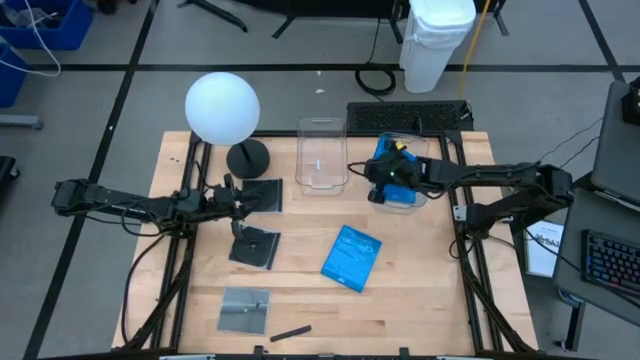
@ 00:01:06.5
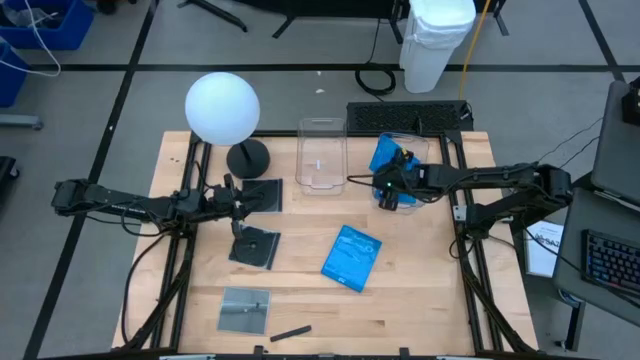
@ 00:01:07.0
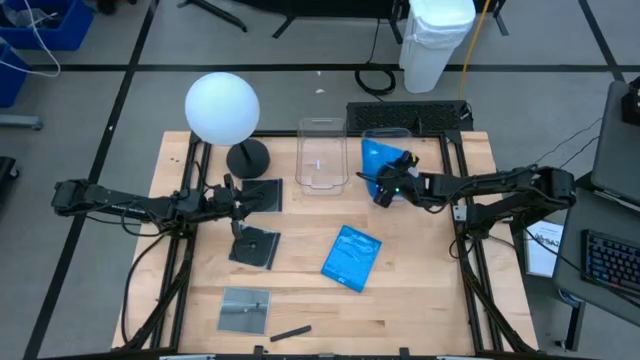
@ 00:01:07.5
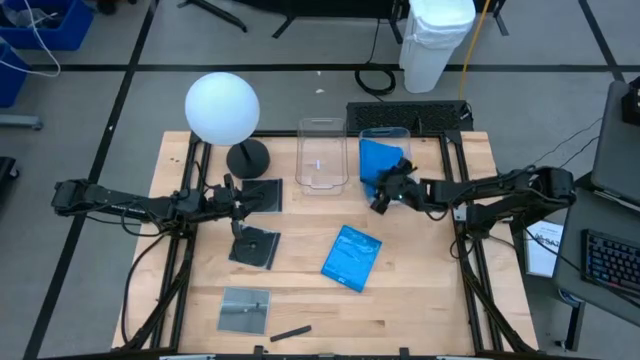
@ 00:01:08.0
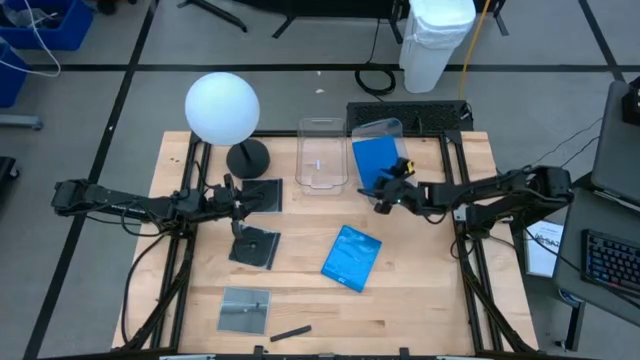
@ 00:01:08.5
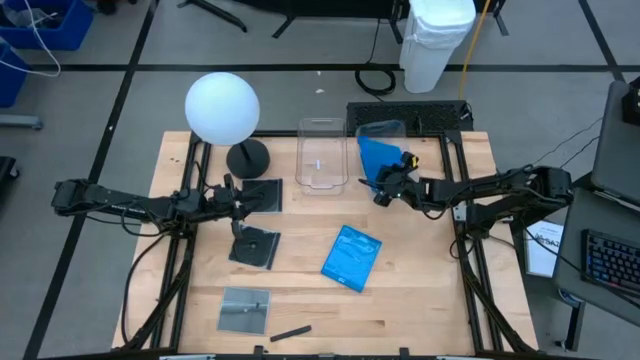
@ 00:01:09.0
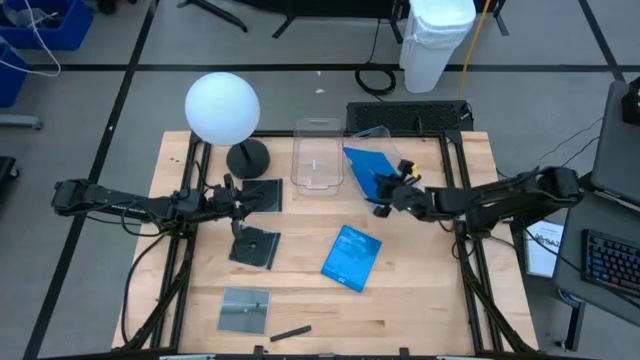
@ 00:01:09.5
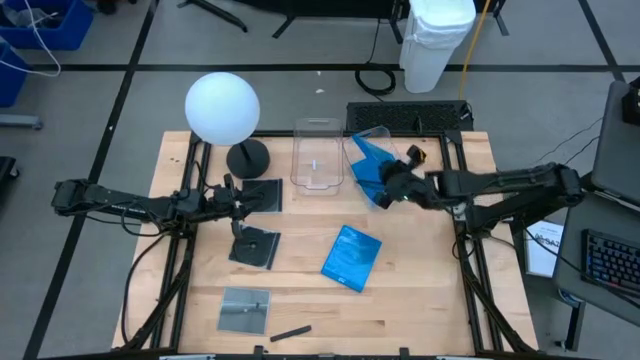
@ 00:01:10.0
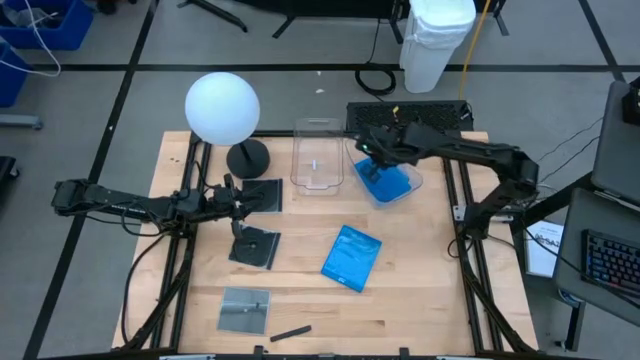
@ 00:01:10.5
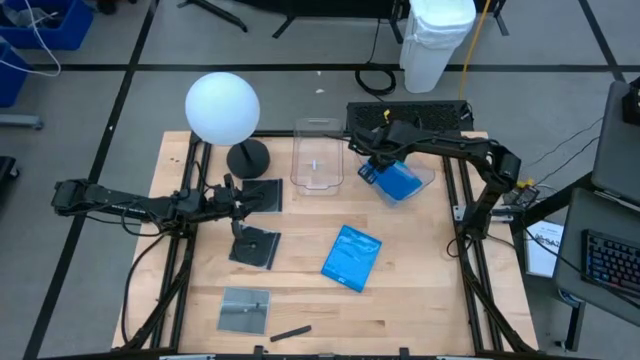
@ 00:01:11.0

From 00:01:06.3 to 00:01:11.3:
Task: Pick & place jewel cases by type
Put the right blue CD case into the right transparent bin

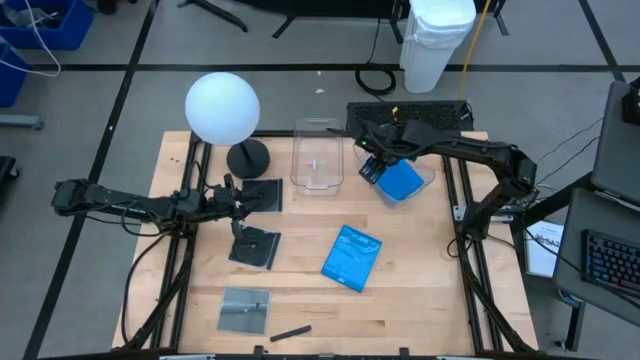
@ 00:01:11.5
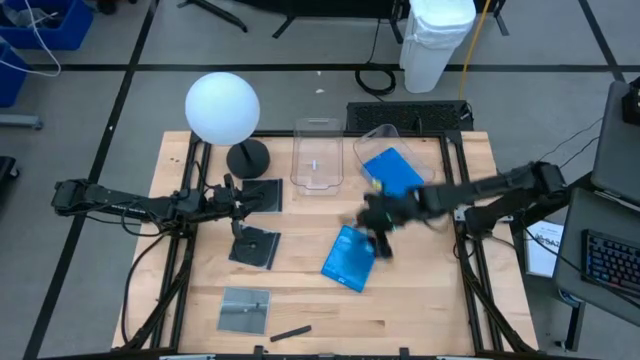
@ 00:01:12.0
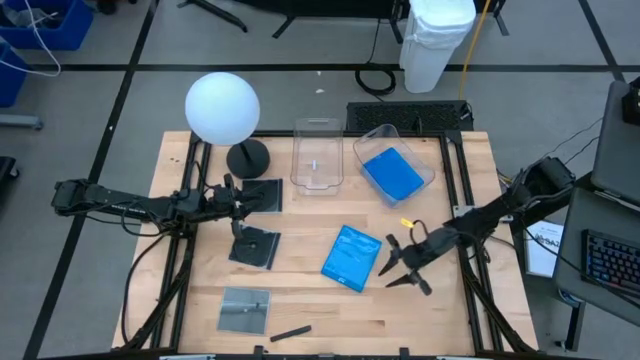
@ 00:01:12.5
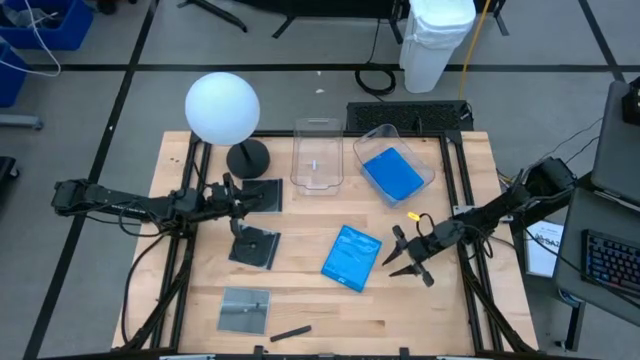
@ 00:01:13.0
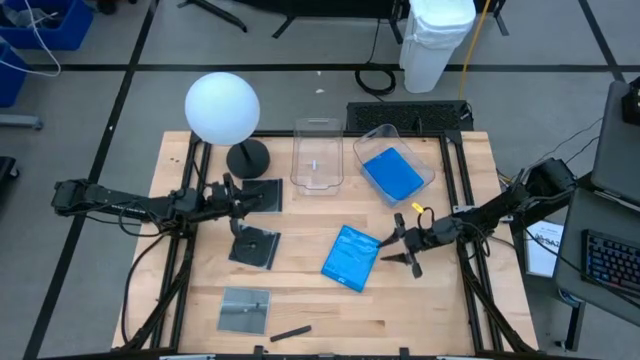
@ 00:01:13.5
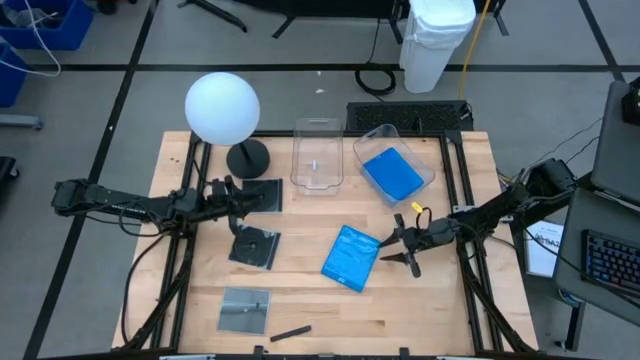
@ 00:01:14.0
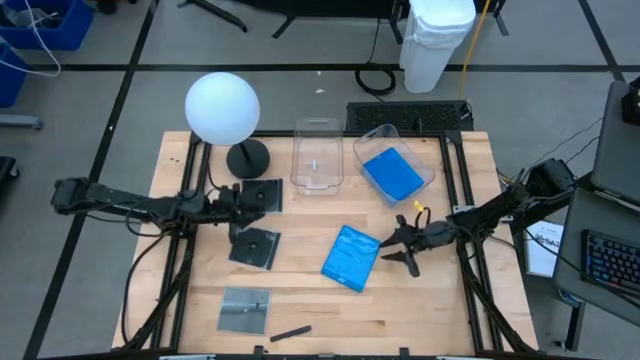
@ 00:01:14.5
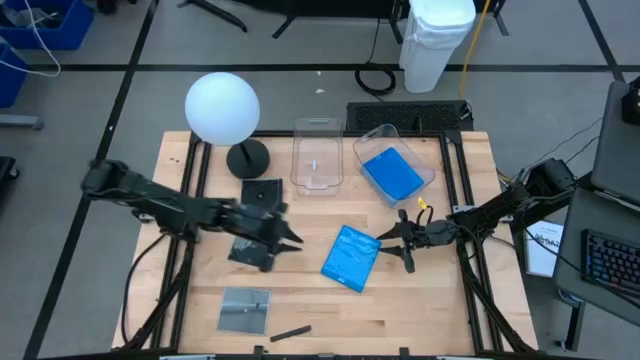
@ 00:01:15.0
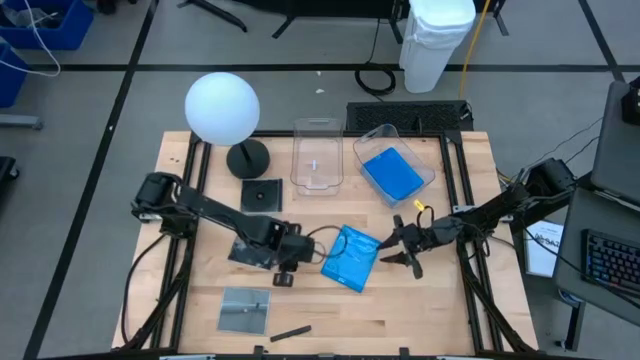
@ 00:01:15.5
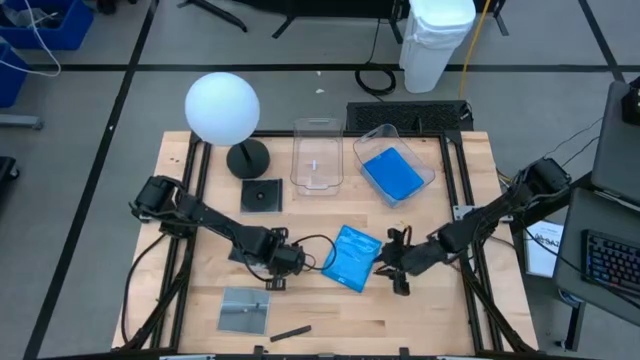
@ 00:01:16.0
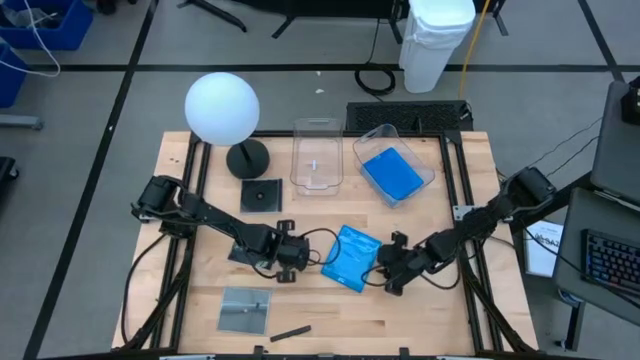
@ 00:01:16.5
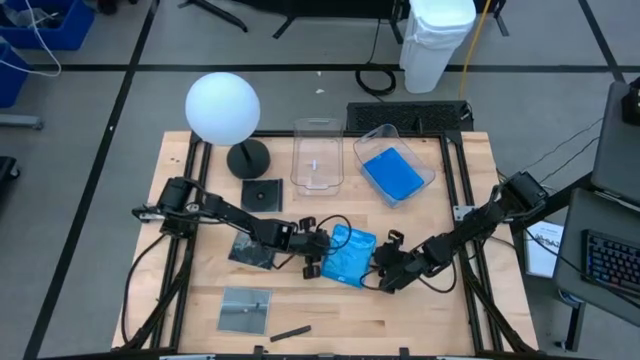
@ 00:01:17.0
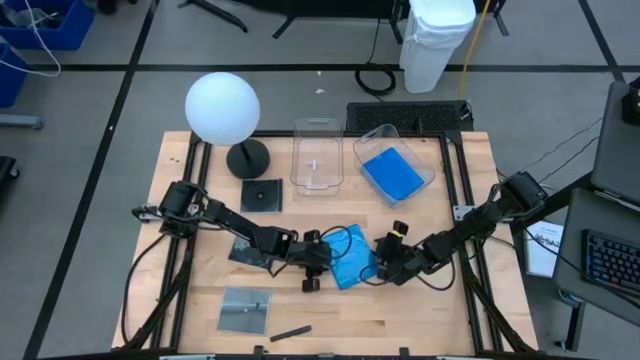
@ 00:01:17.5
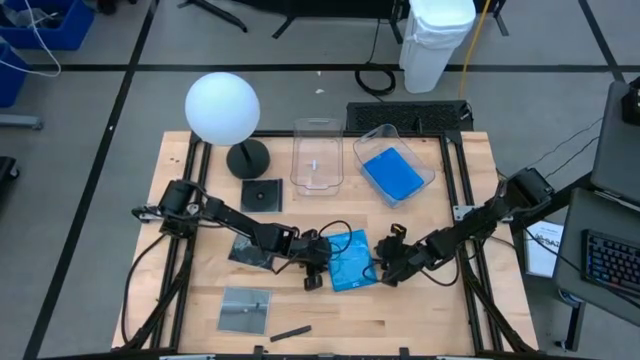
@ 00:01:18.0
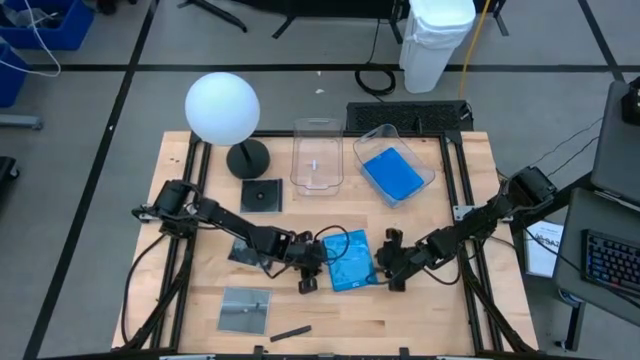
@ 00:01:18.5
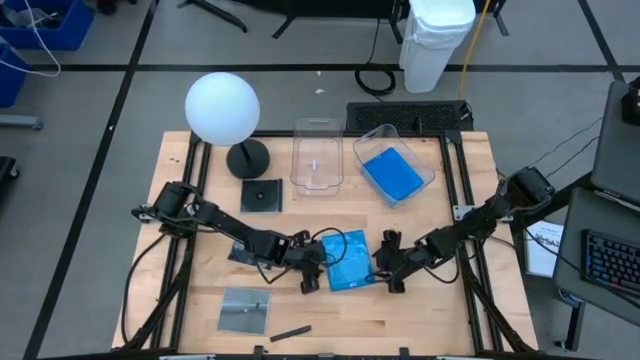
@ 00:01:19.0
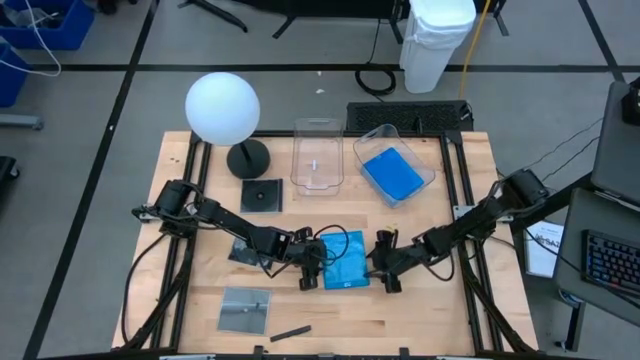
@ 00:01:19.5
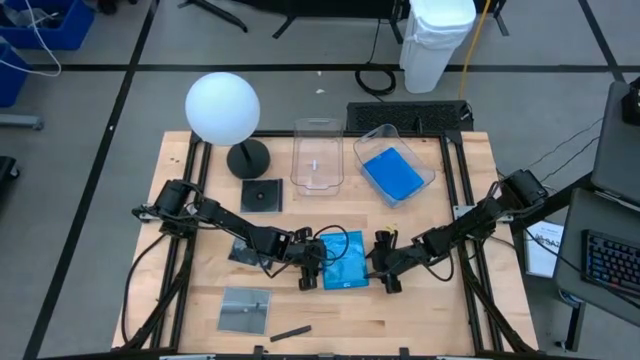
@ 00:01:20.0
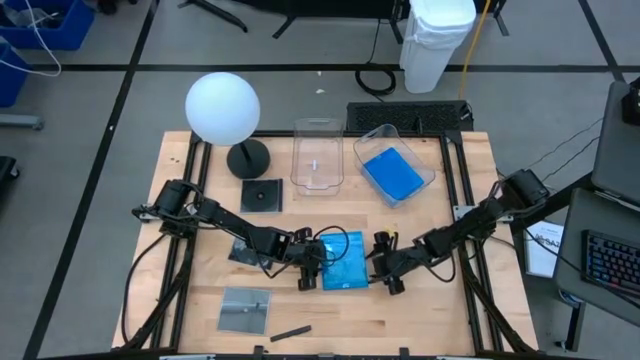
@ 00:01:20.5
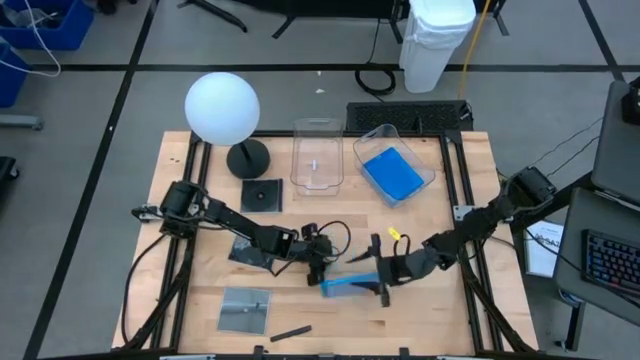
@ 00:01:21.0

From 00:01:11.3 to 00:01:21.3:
Put the blue CD case into the right transparent bin

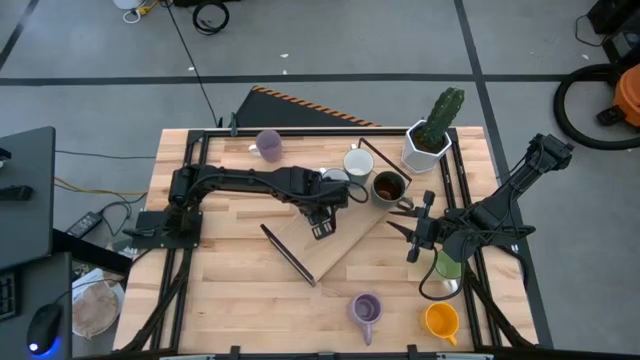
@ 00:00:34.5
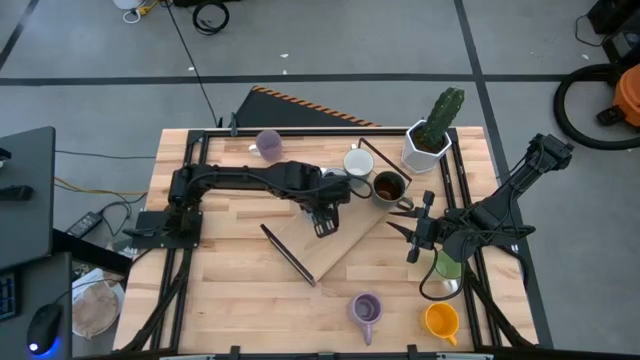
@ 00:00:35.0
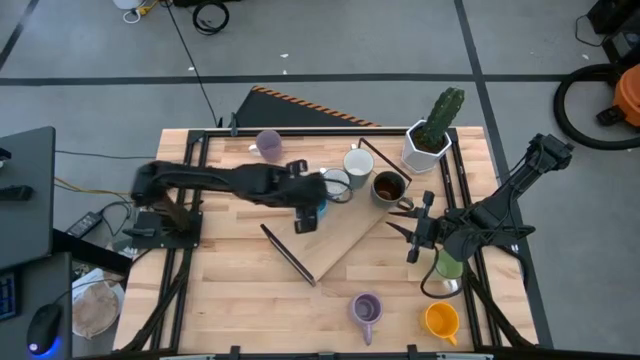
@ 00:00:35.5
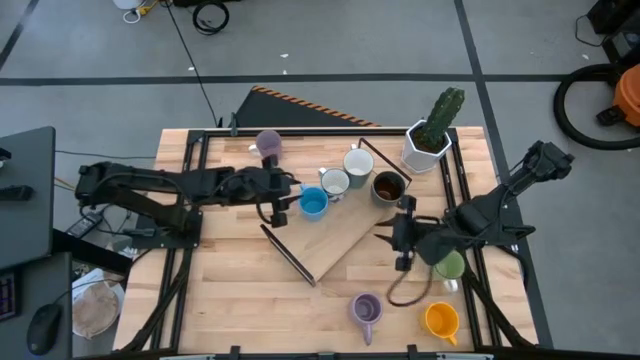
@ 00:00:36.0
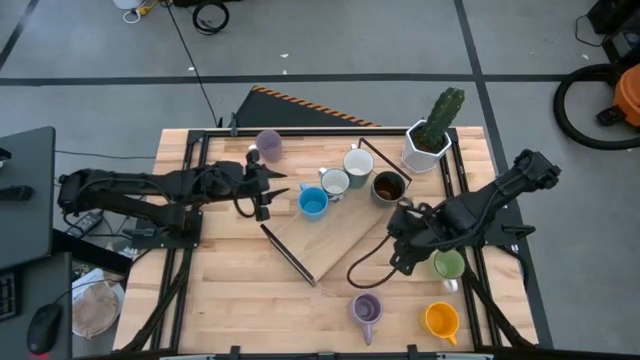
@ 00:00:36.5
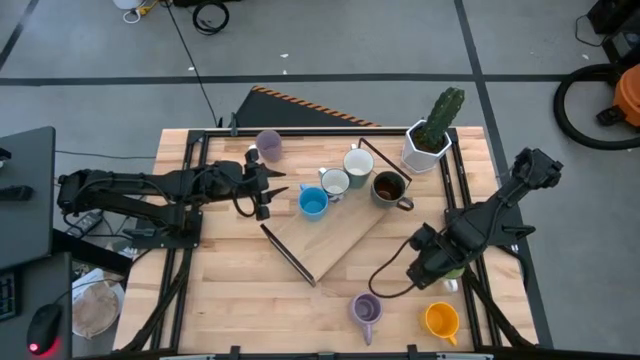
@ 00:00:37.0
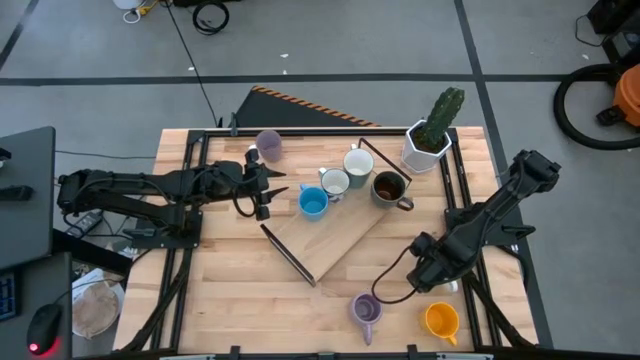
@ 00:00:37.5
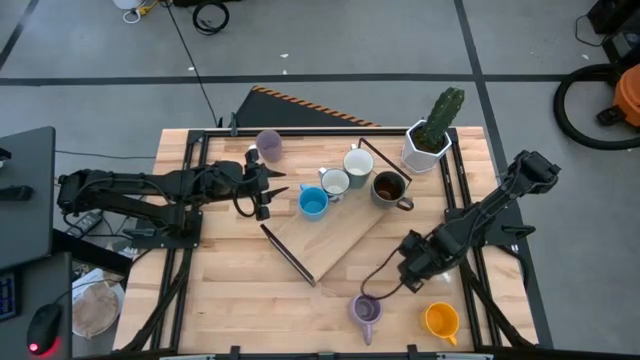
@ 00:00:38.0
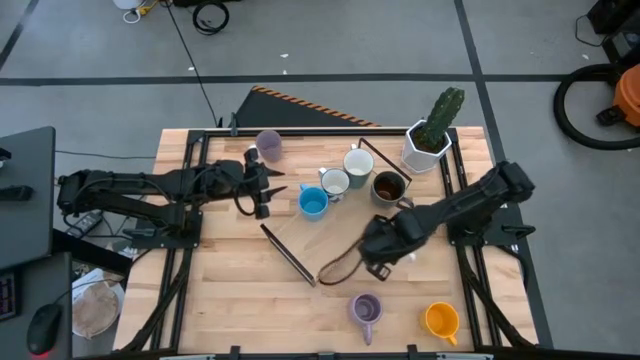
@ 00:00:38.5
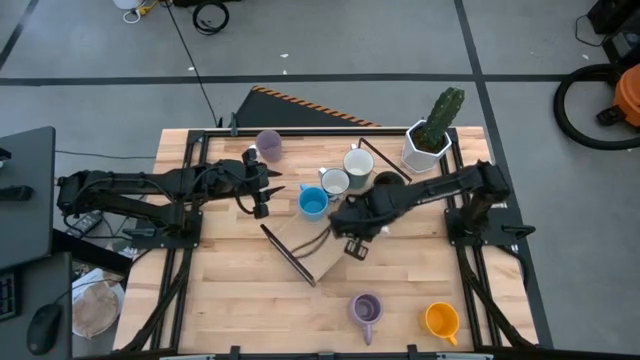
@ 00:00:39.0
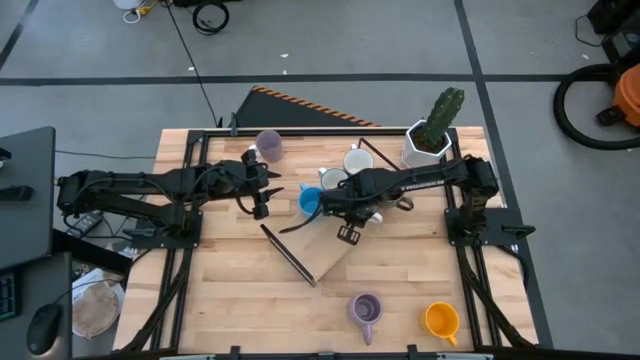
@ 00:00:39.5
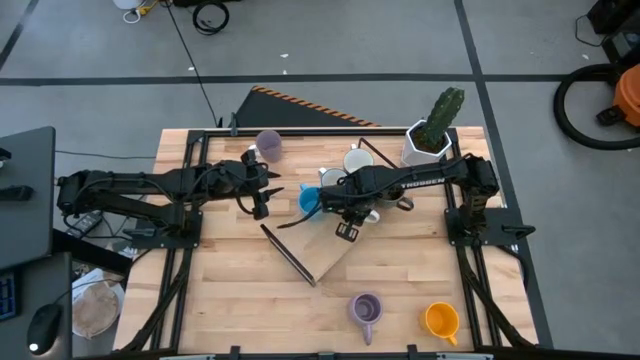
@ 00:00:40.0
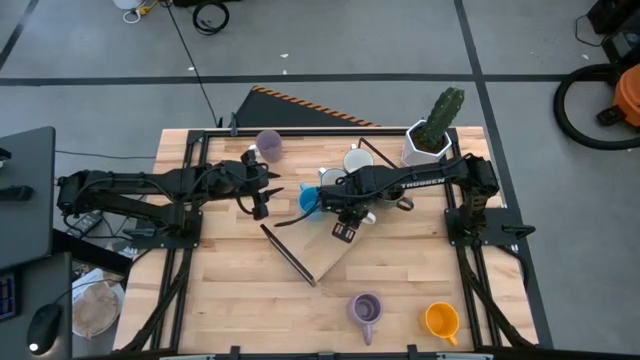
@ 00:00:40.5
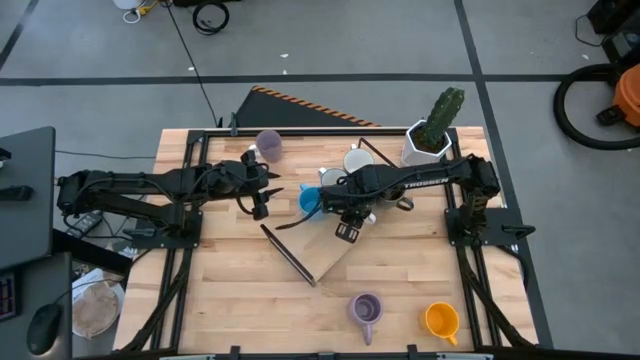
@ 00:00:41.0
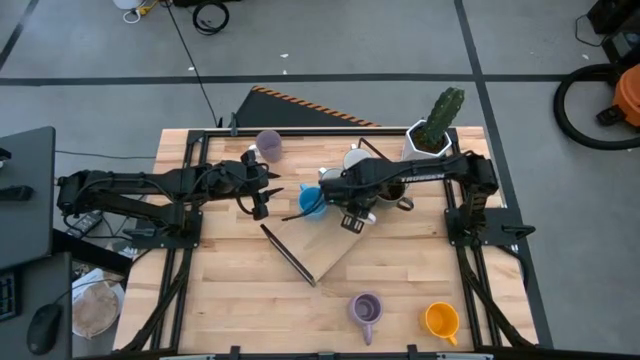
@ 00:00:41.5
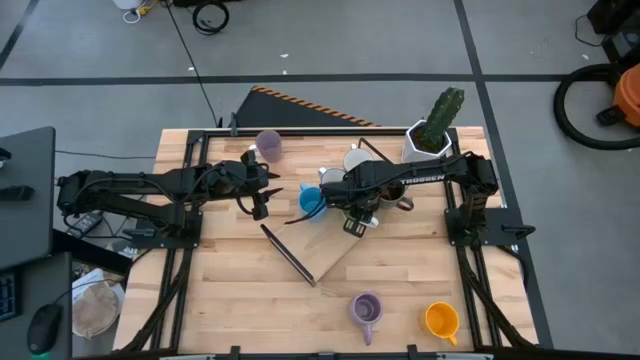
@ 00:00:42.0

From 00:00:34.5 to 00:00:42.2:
Task: Place coffee mugs
Put the light green mug on the shelf
